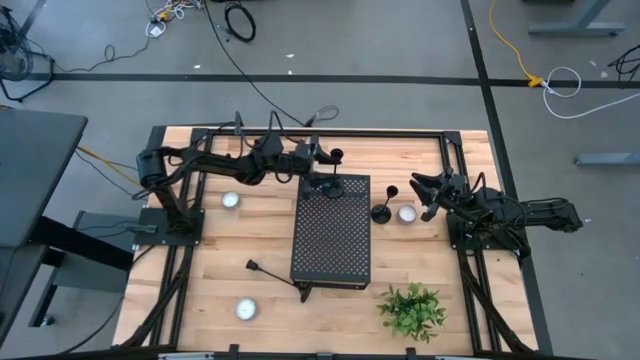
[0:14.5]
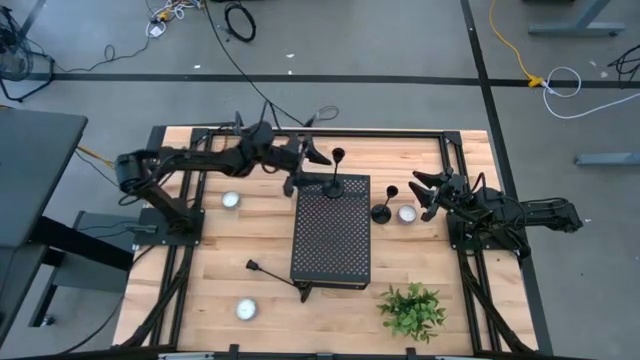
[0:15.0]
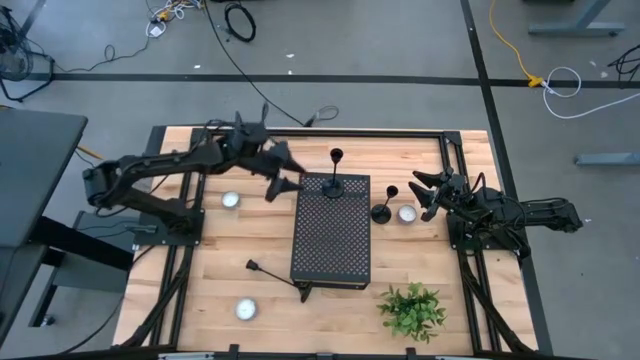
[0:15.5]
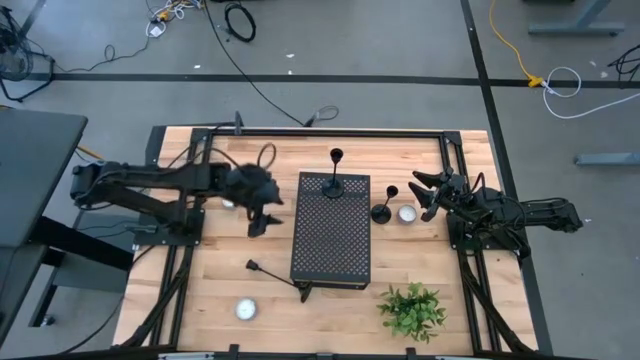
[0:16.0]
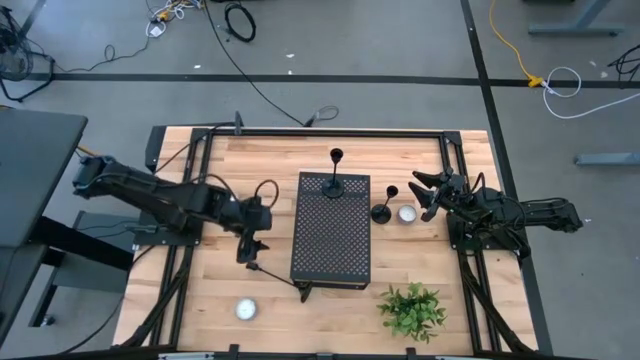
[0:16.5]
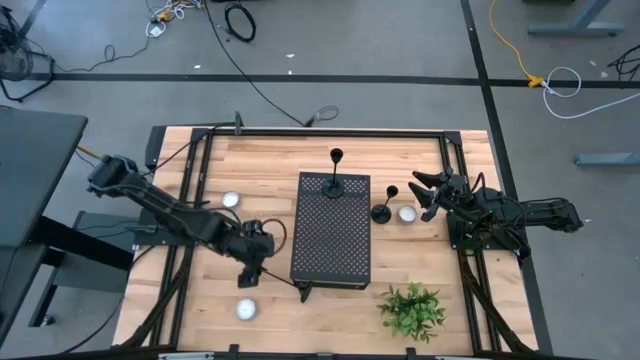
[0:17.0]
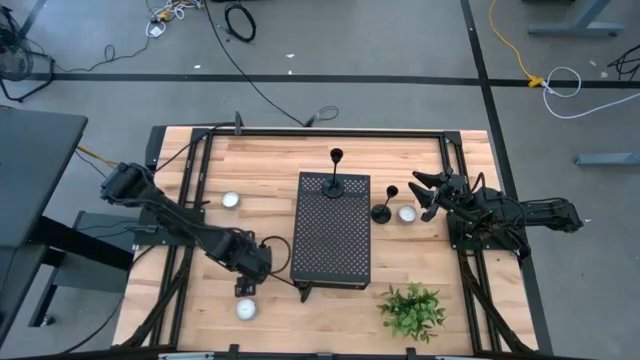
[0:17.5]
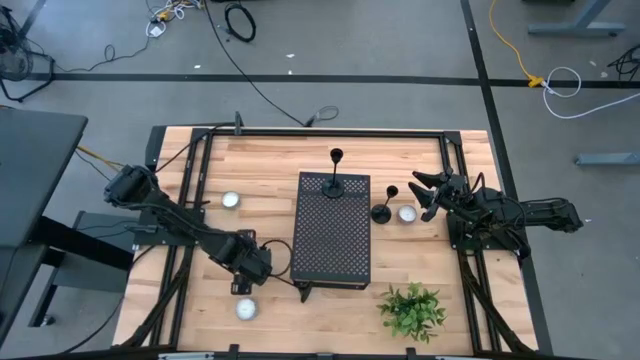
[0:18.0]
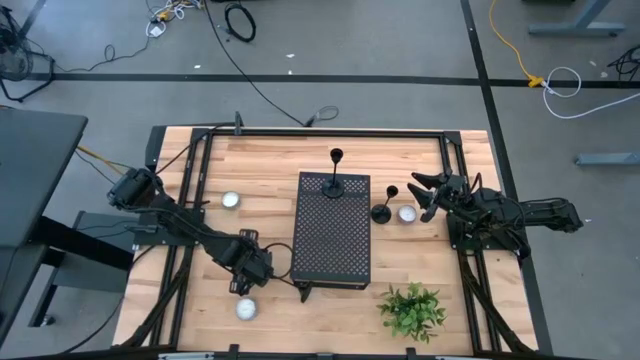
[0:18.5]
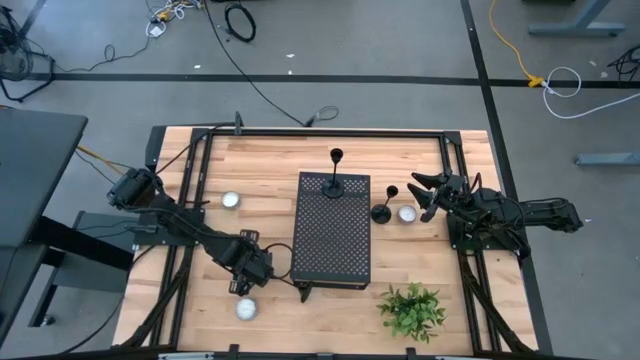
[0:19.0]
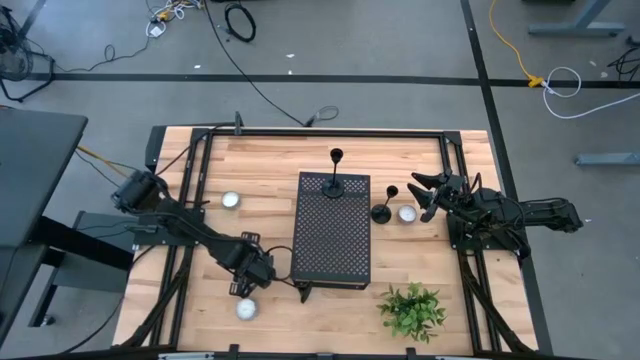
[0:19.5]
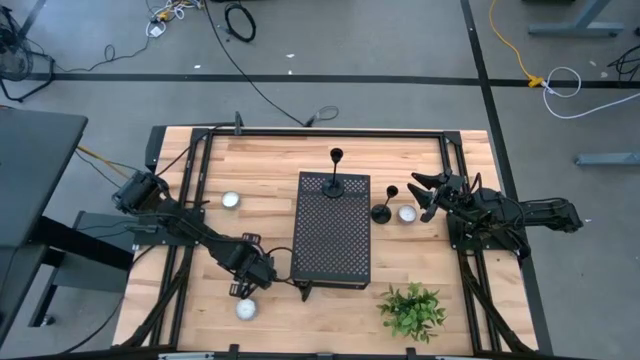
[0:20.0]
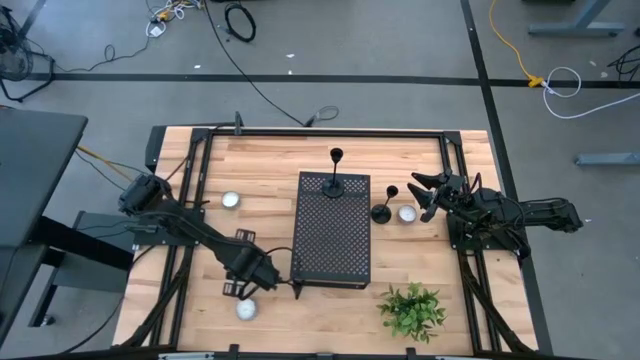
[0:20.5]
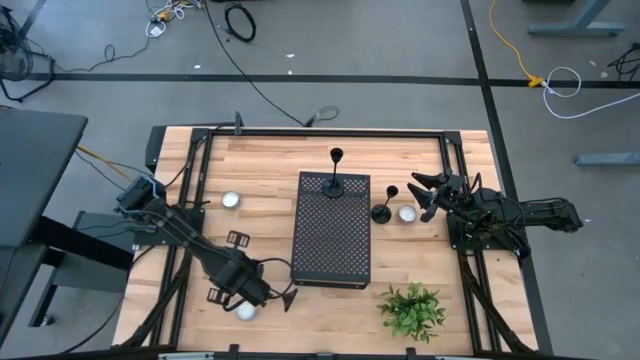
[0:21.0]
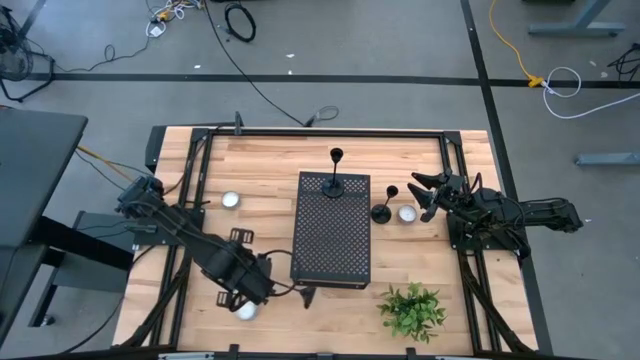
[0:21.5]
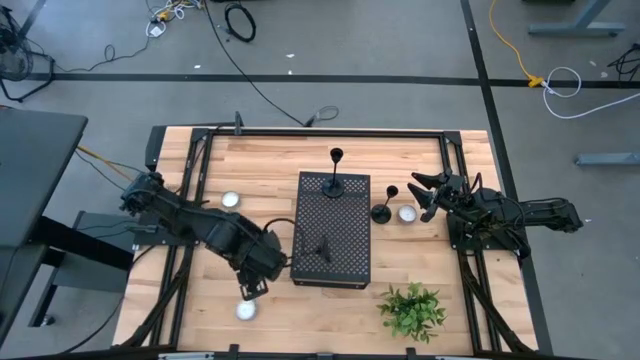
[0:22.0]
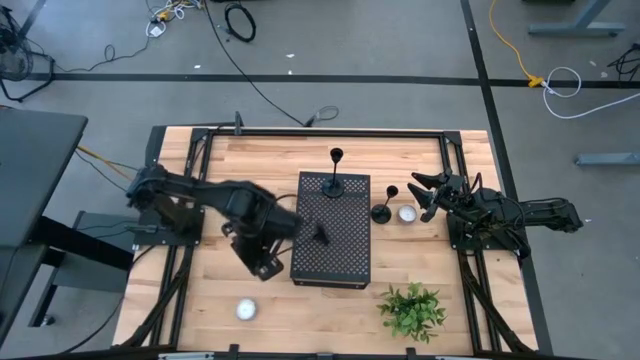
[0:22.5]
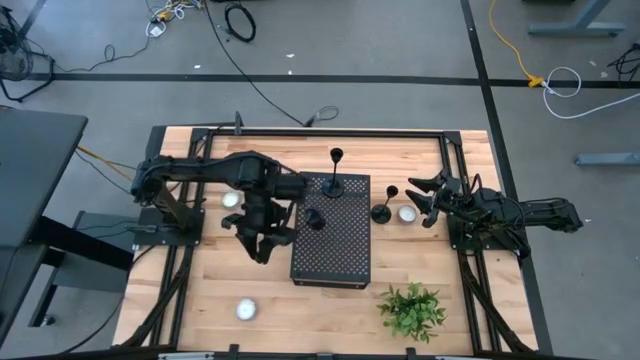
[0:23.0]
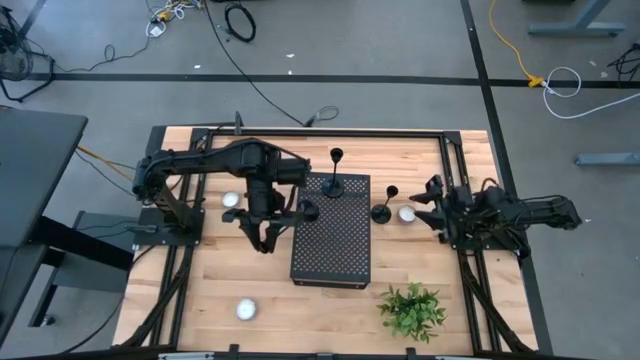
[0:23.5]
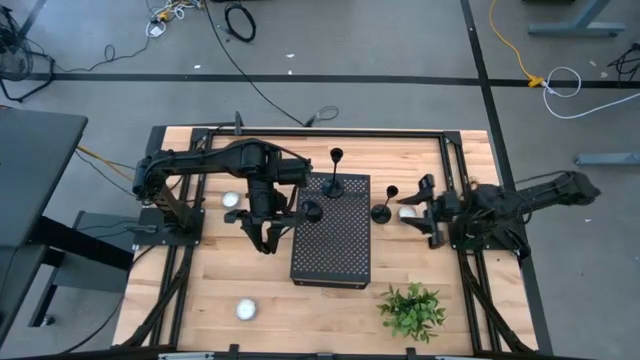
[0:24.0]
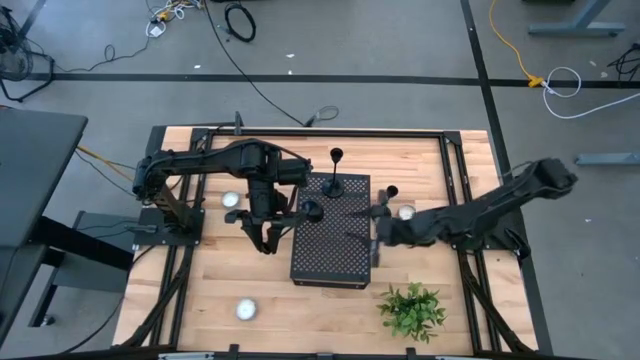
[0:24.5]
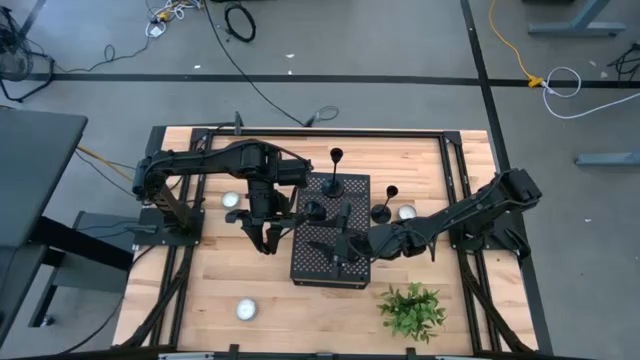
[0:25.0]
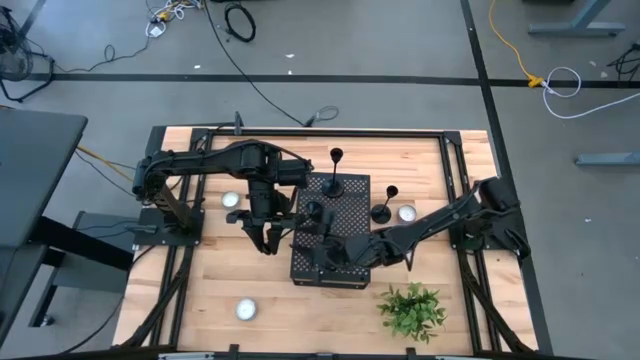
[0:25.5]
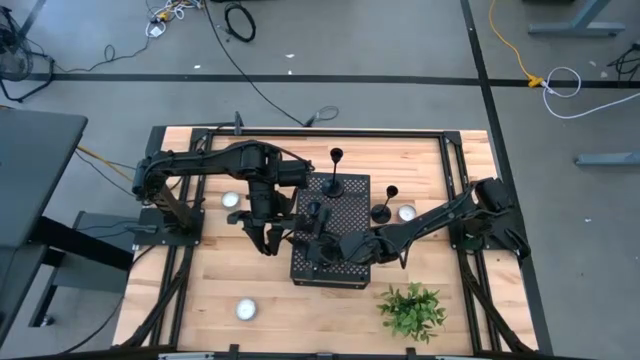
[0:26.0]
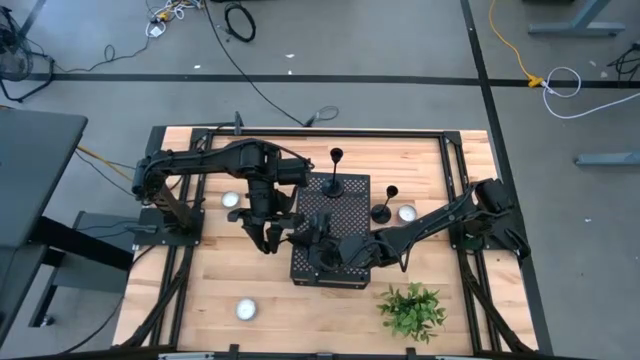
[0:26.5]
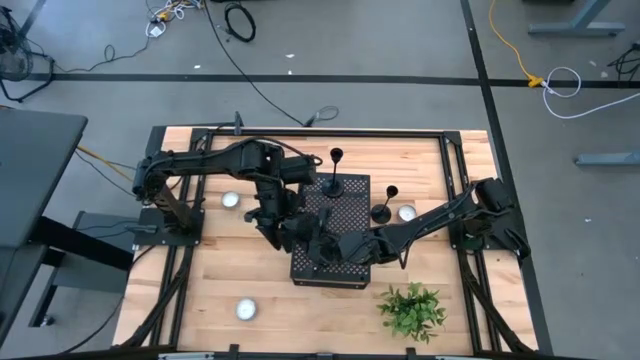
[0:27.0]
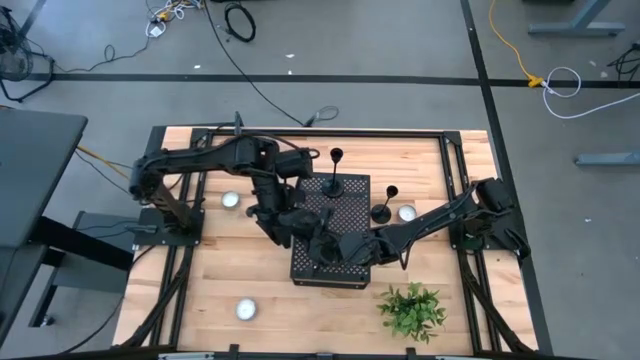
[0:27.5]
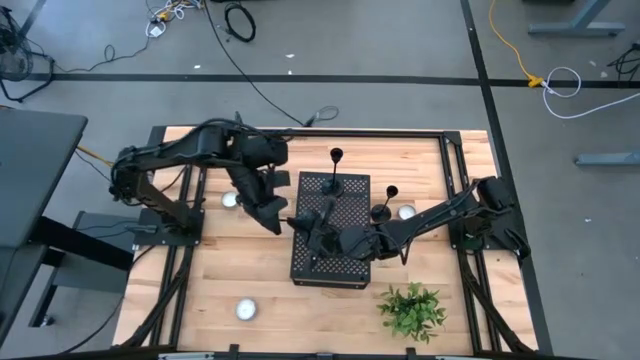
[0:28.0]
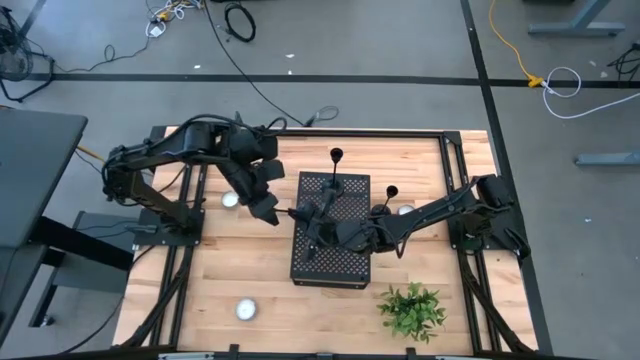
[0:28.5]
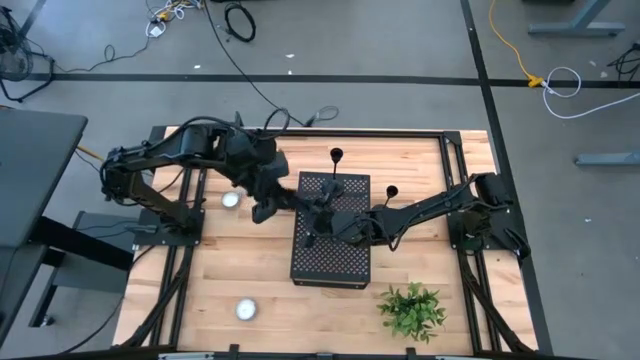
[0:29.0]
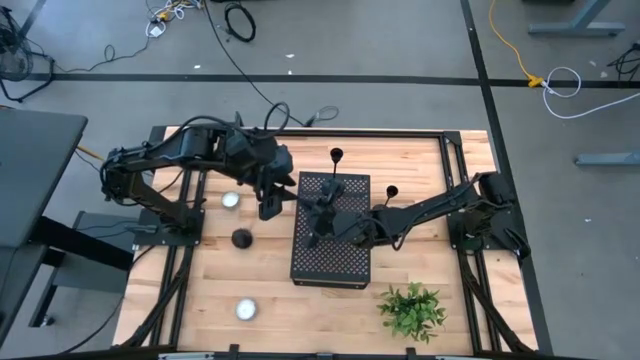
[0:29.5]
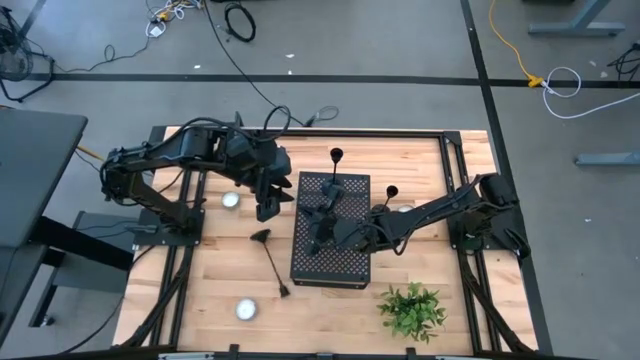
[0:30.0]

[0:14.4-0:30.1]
Task: Pick & Place candle stick holders
Put the bottom black candle holder on the shelf

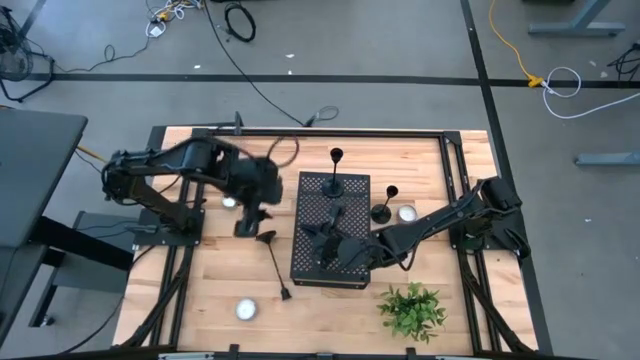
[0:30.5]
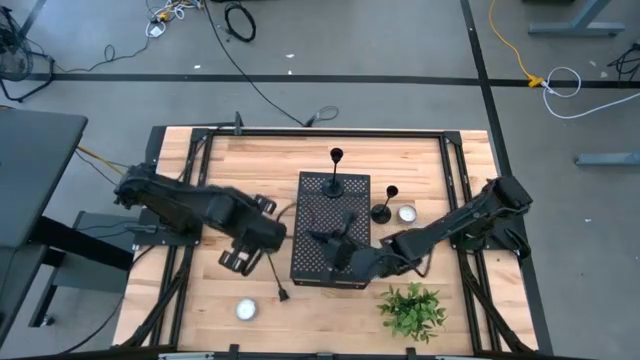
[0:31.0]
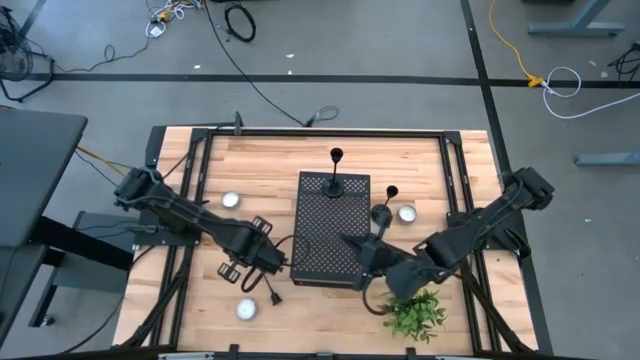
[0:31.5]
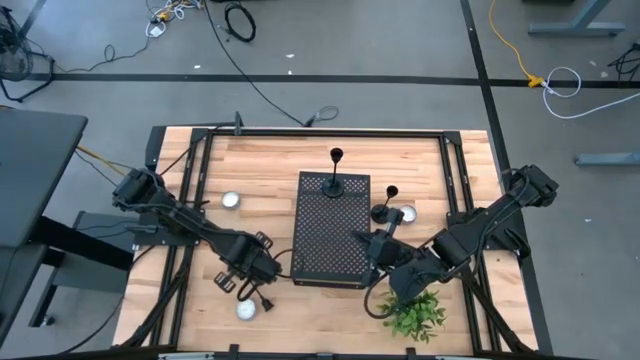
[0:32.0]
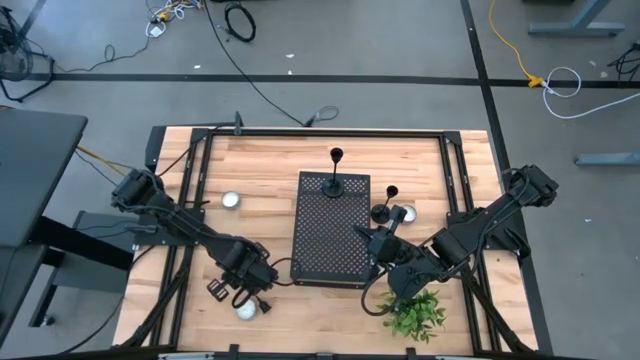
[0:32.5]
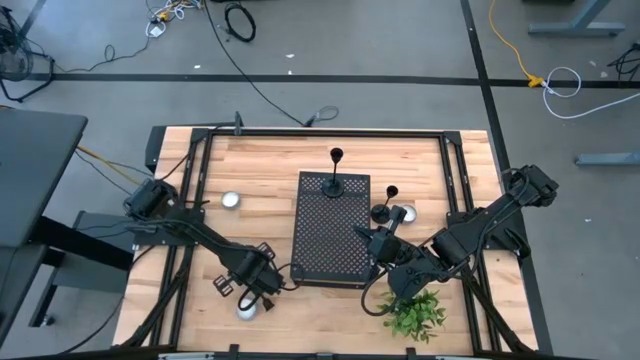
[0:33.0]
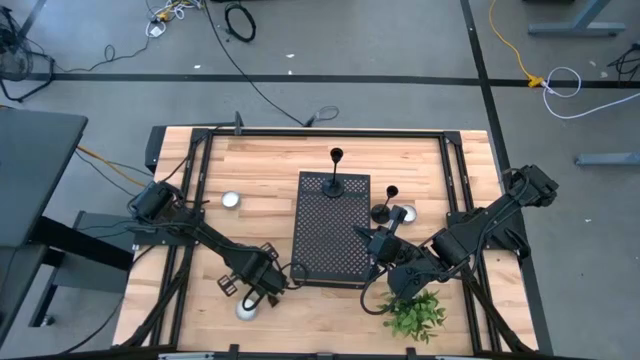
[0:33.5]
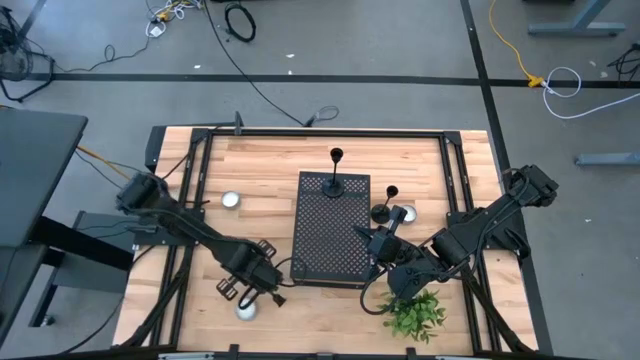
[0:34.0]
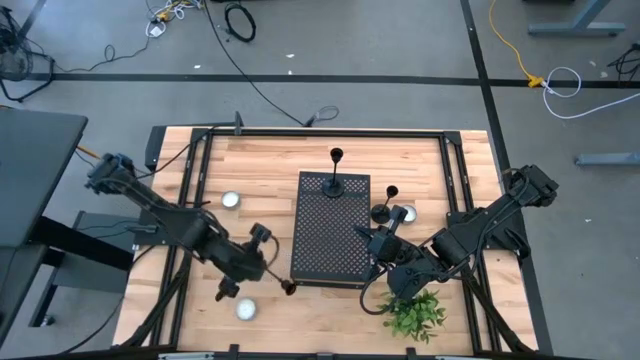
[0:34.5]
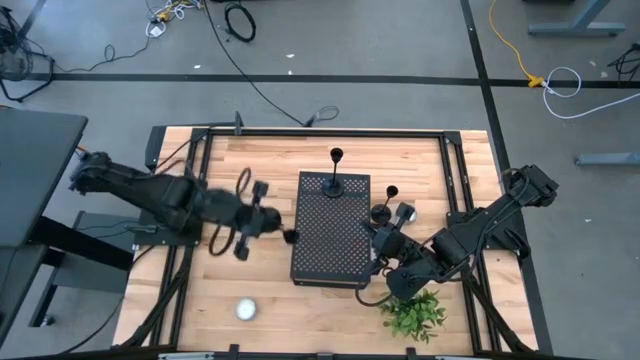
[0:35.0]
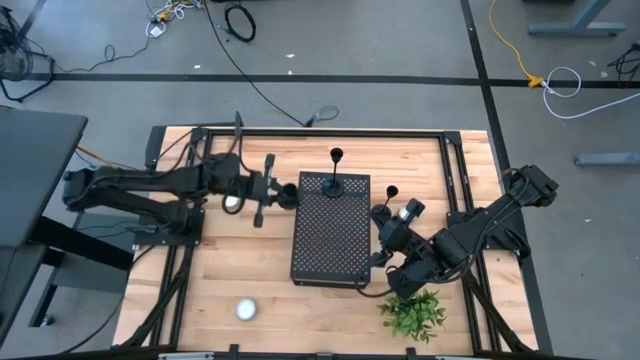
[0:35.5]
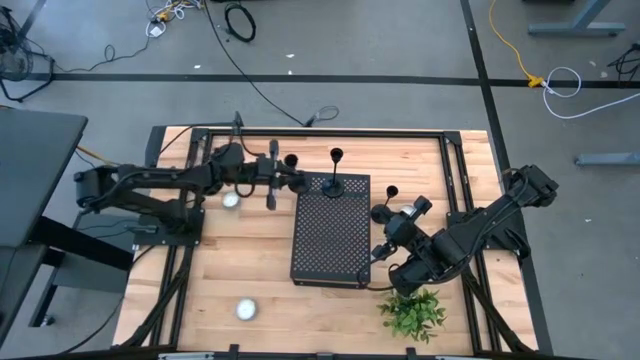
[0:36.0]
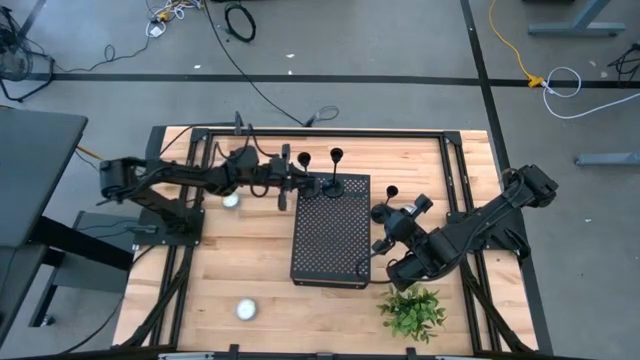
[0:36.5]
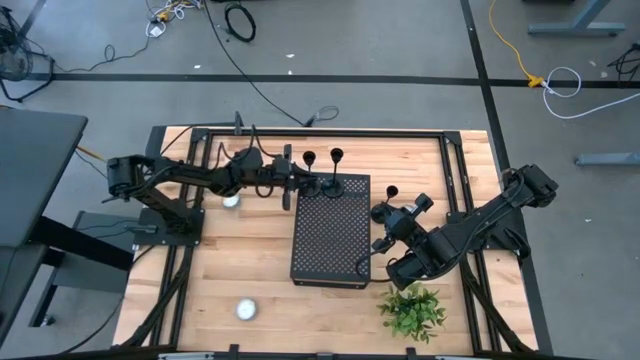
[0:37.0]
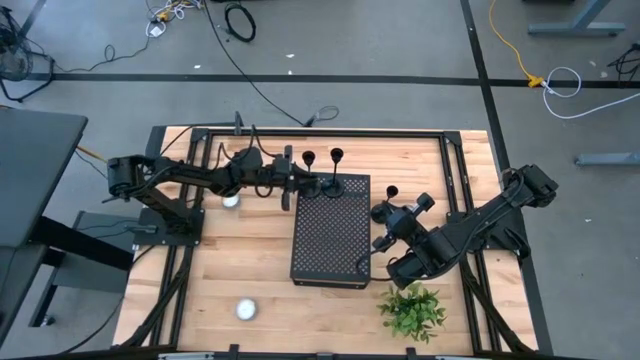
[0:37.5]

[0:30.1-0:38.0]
Put the bottom black candle holder on the shelf
